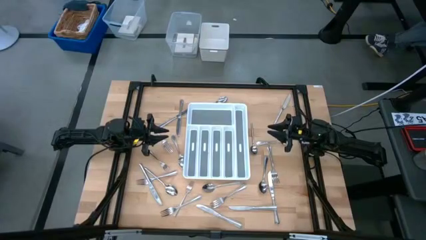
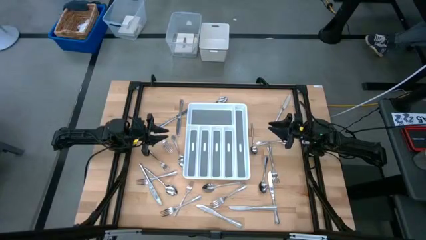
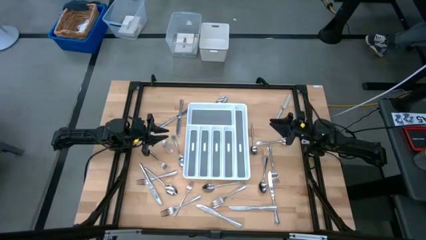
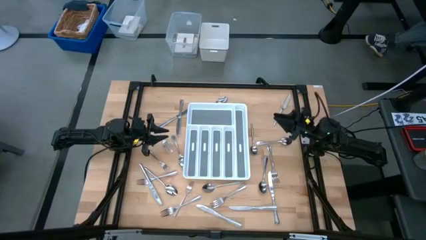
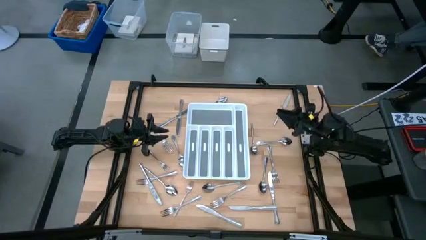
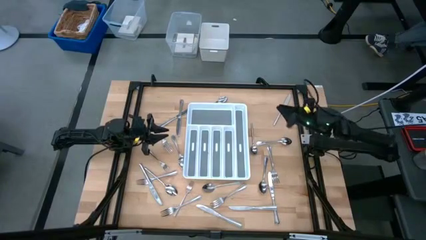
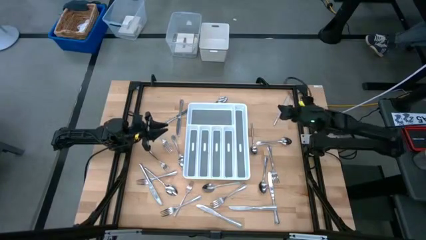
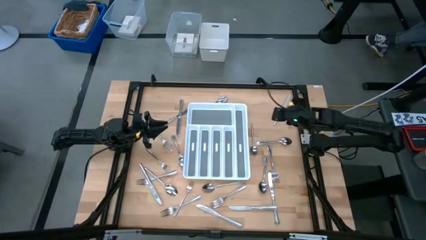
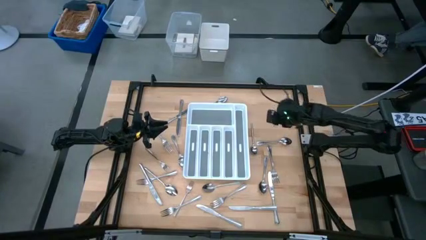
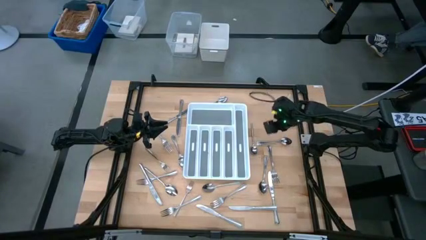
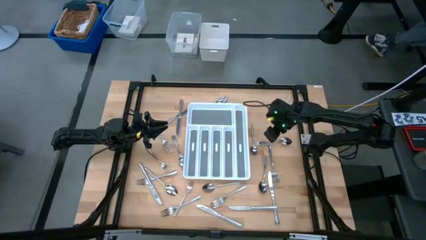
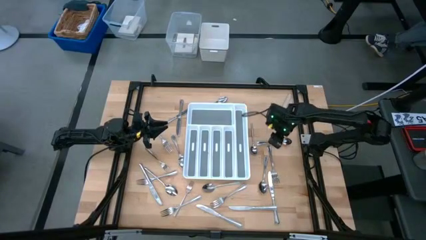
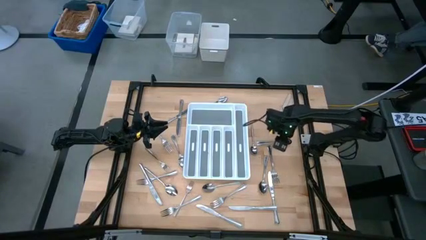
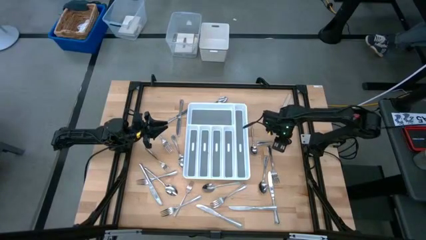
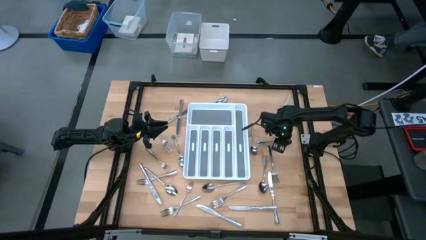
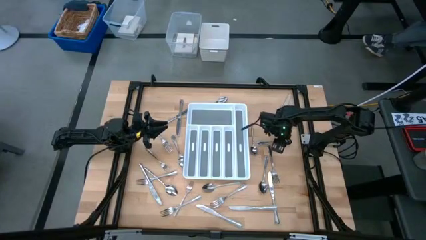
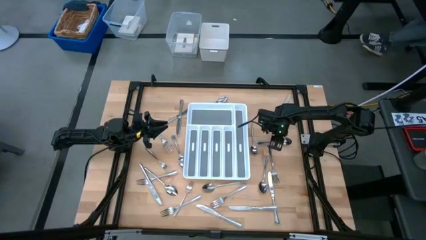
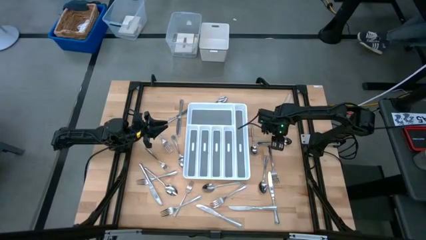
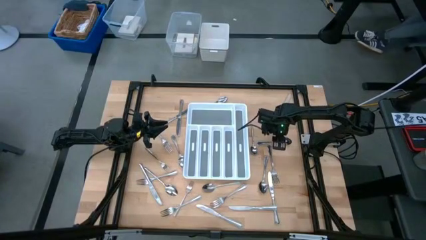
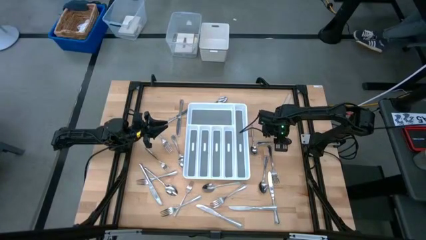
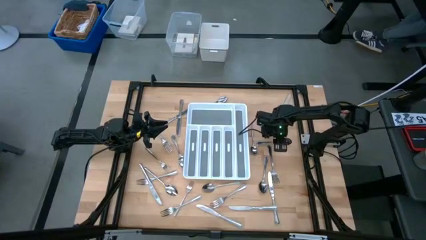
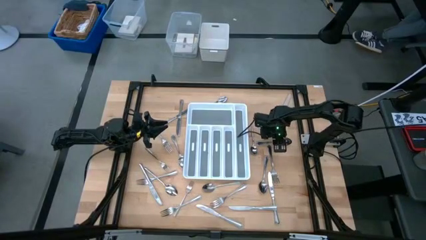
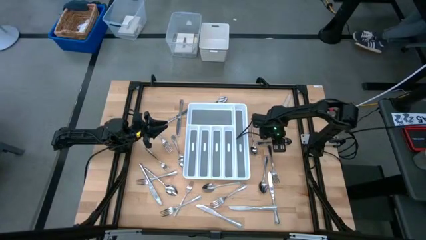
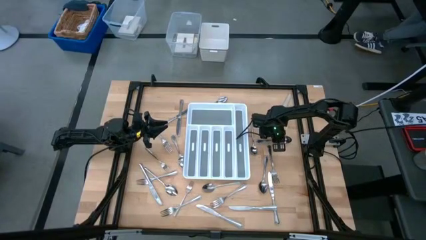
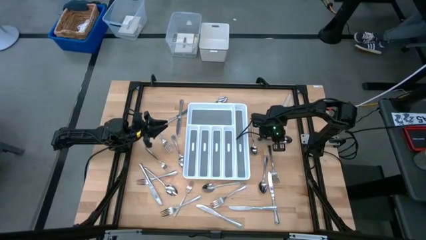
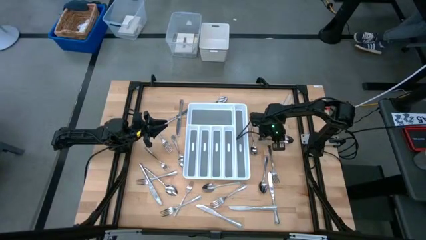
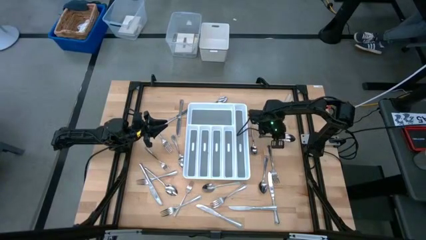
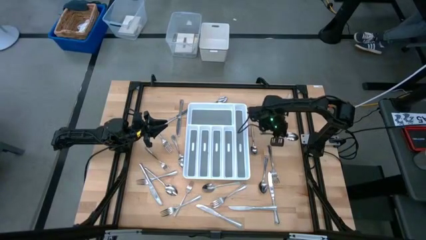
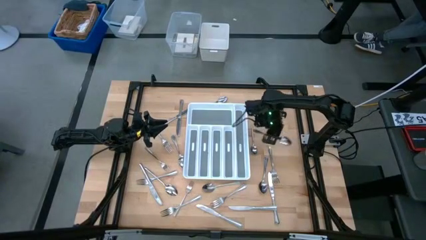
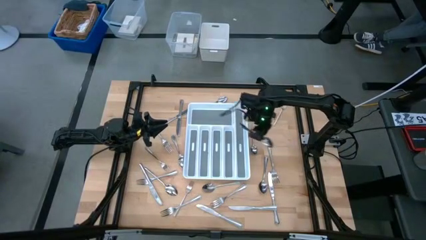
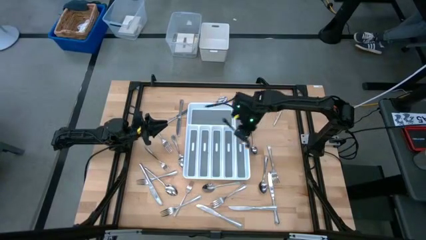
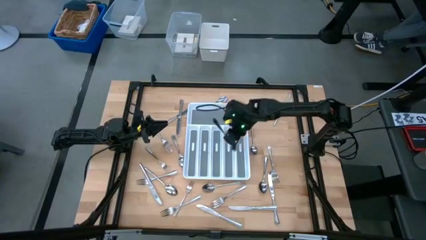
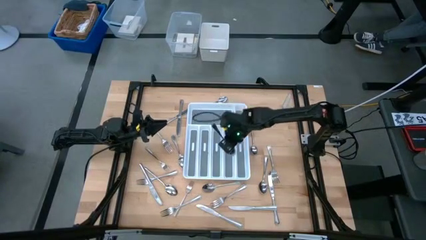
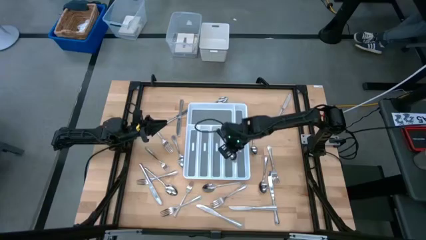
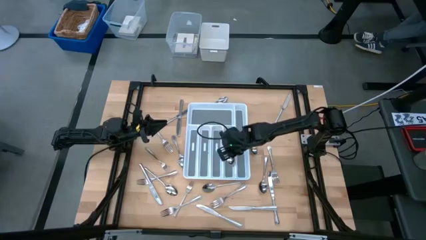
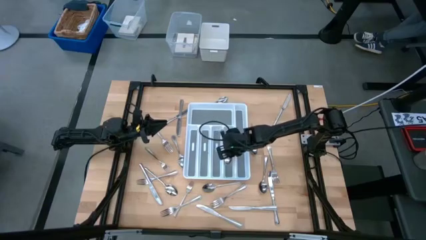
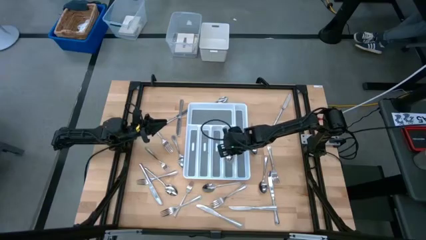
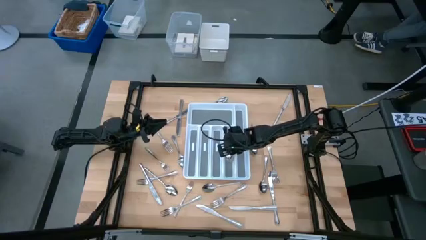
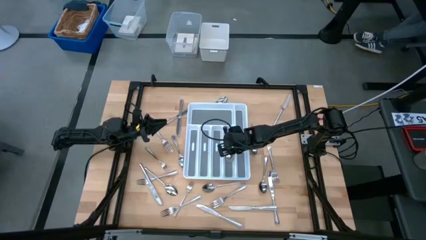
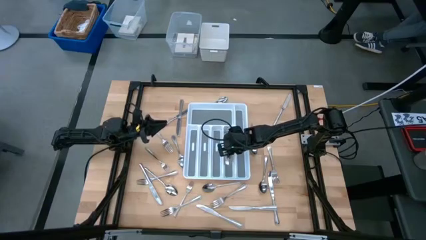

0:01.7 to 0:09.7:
Task: Sort silverware
Put the silver spoon into the white cutlery tray

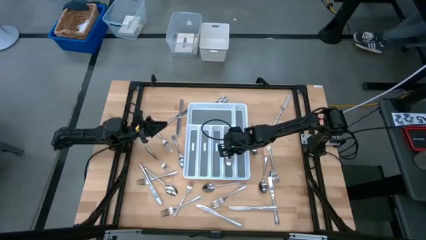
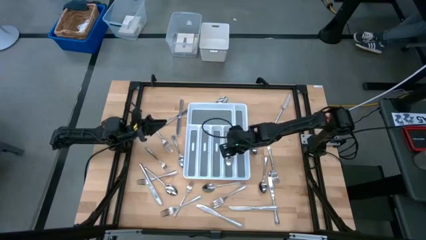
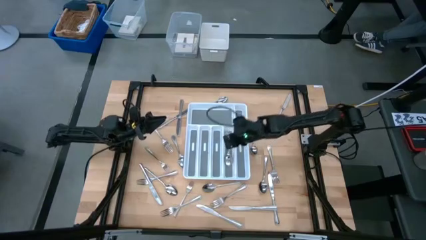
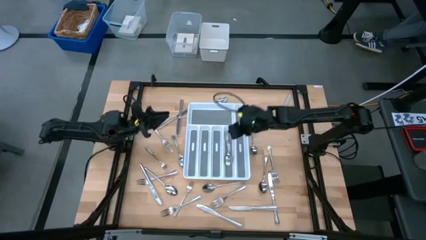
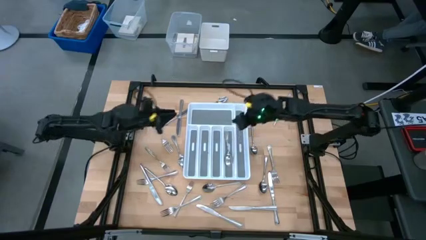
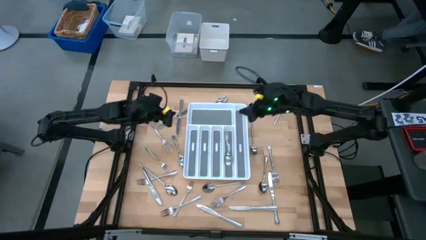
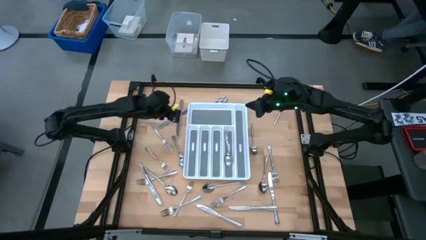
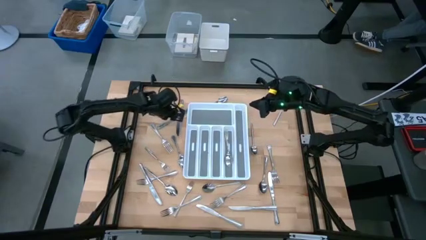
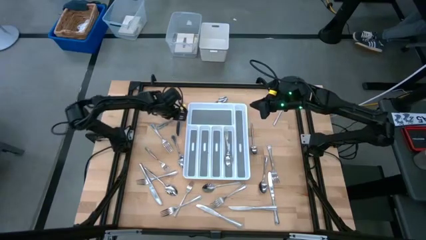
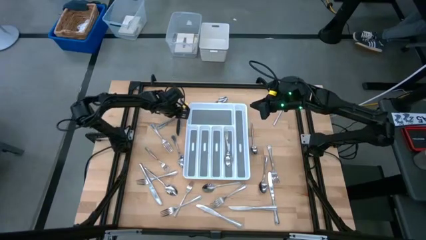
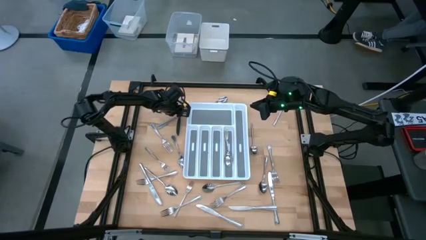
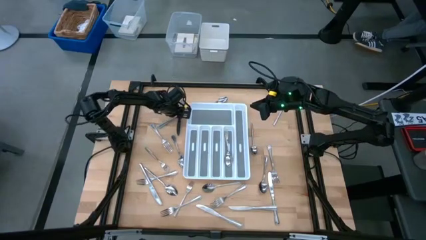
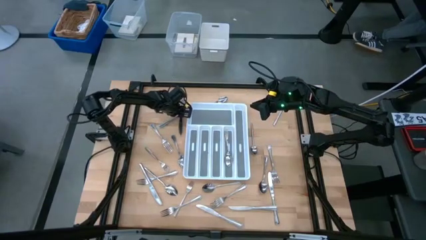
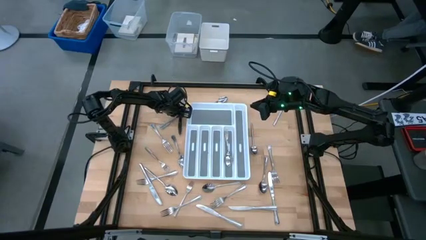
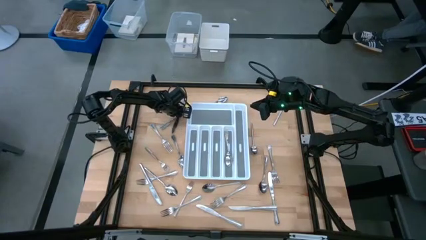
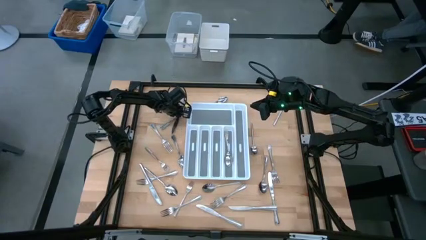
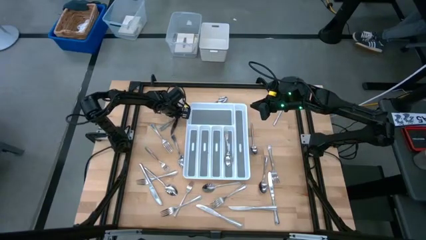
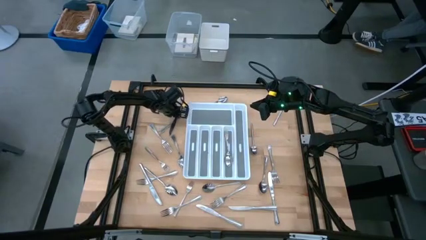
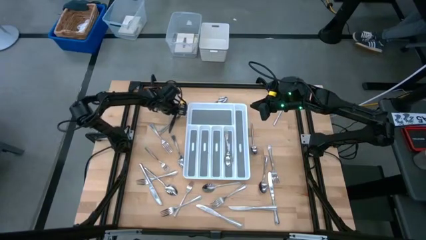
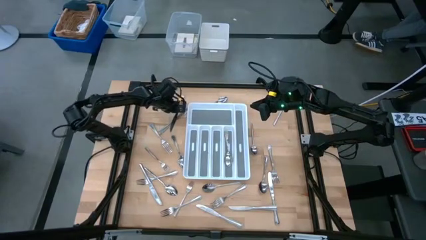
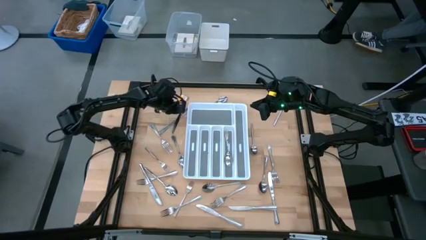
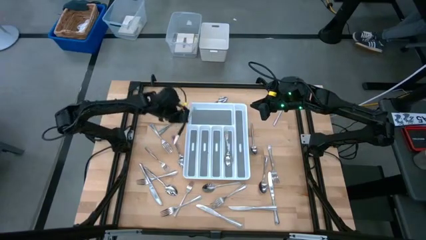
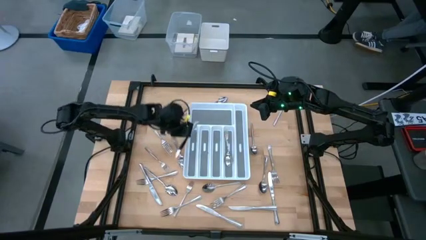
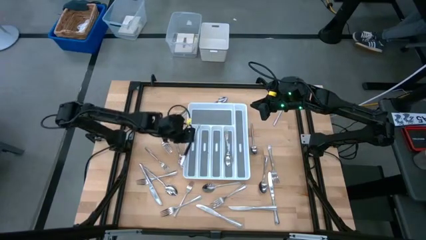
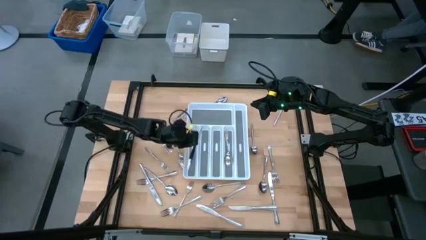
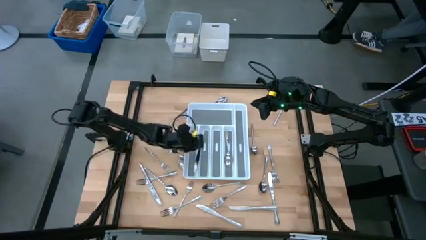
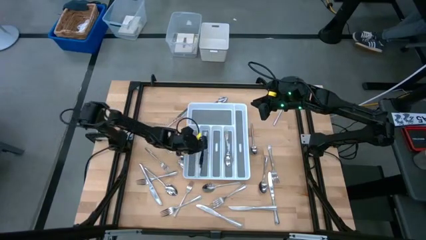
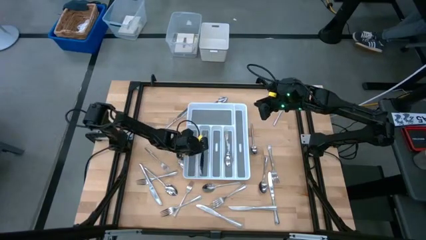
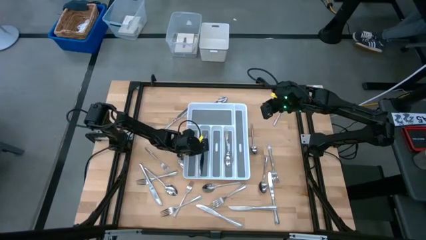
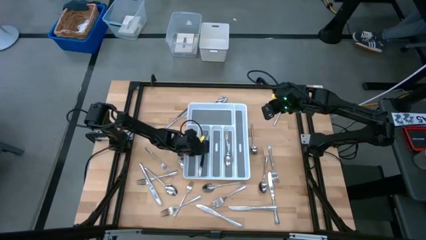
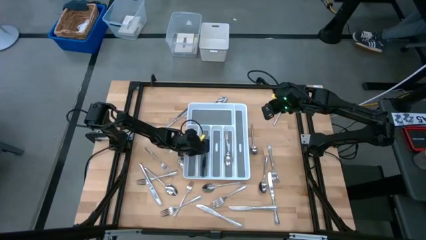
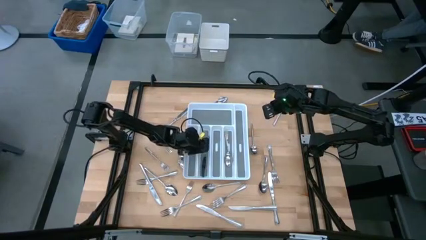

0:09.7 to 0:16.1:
Put the silver table knife into the white cutlery tray
